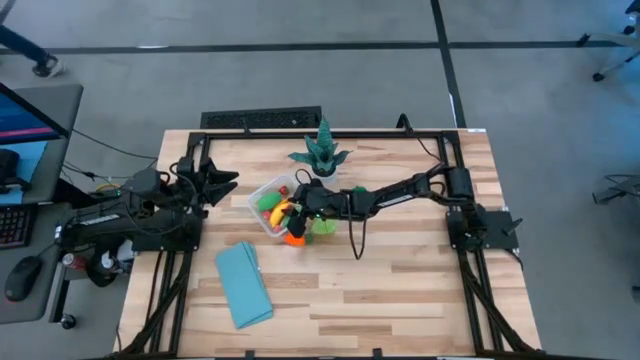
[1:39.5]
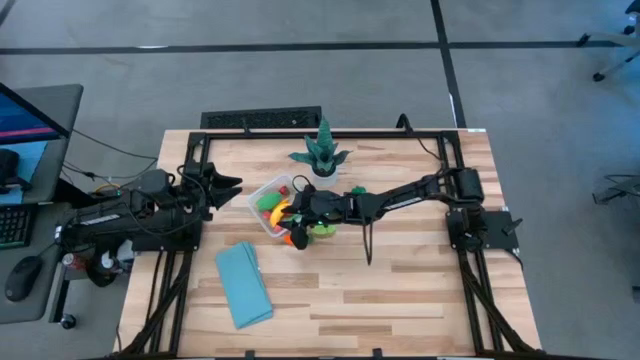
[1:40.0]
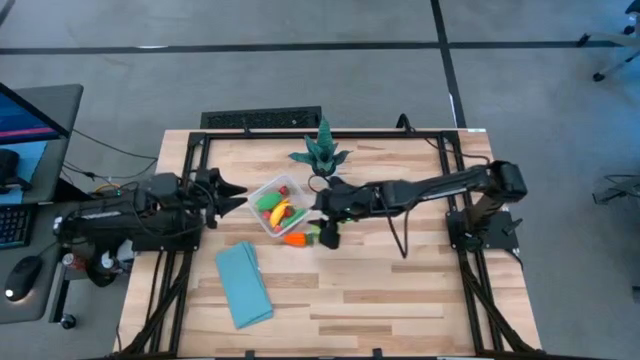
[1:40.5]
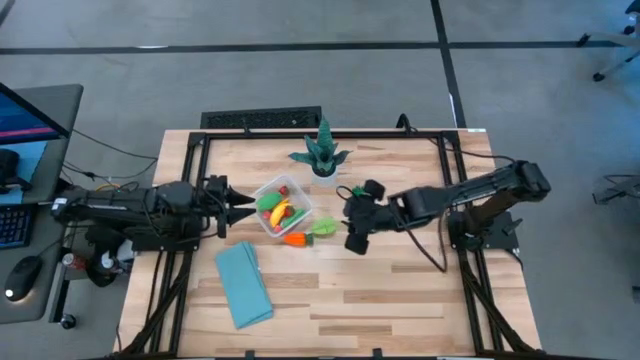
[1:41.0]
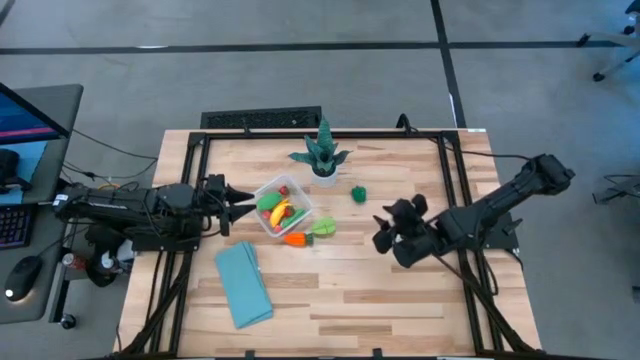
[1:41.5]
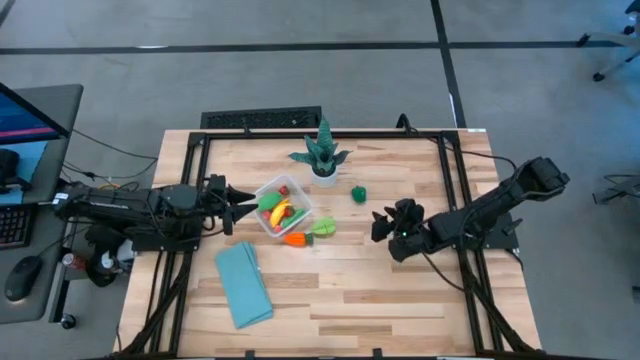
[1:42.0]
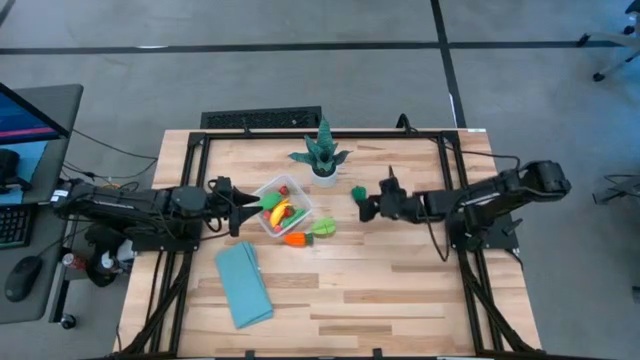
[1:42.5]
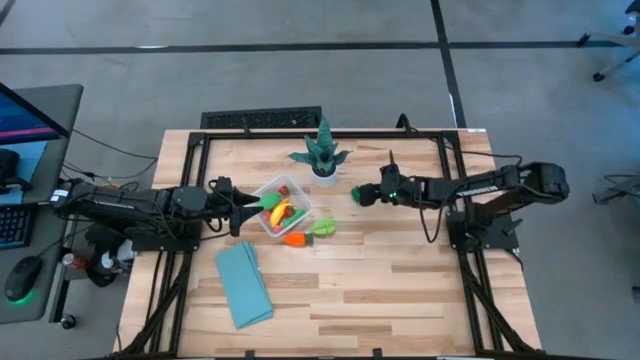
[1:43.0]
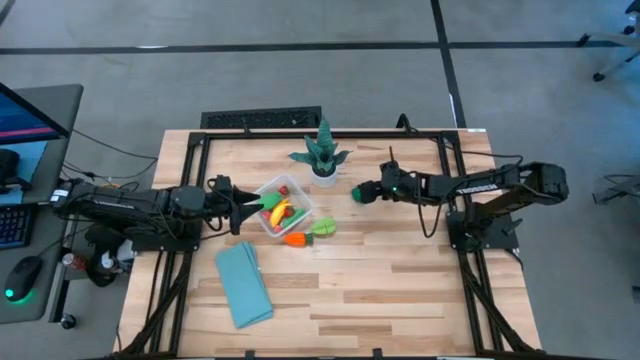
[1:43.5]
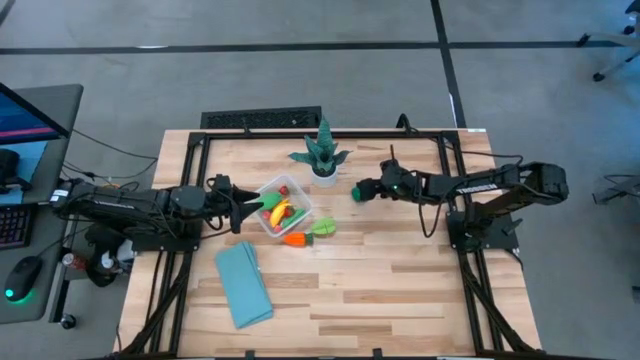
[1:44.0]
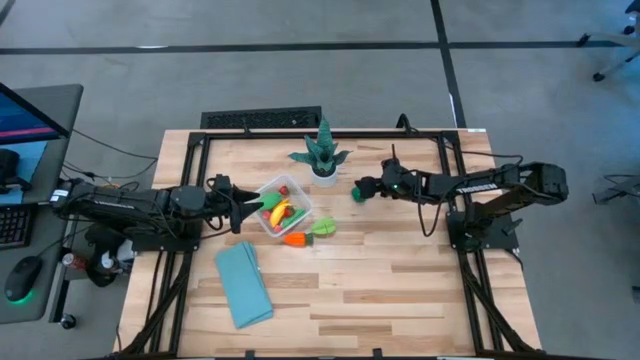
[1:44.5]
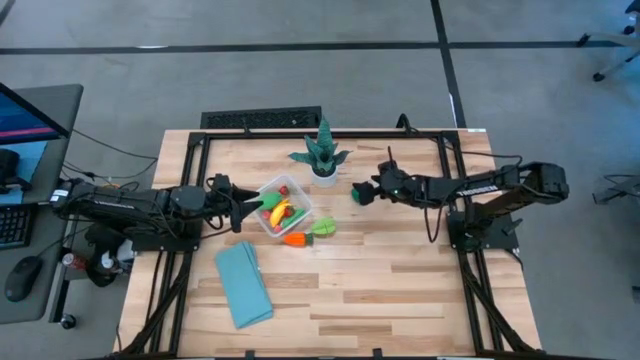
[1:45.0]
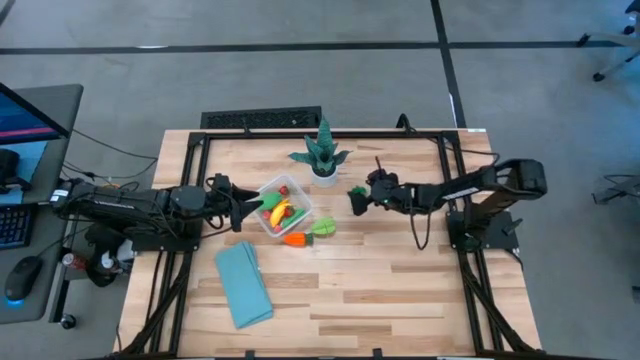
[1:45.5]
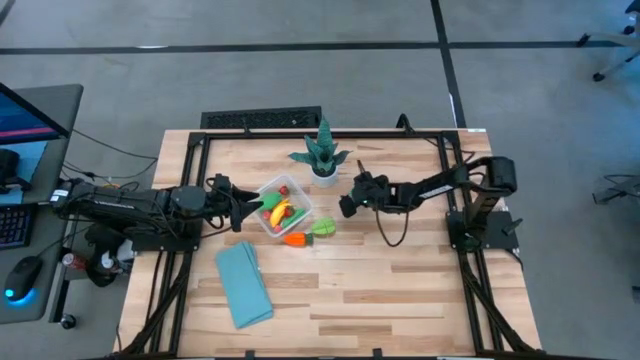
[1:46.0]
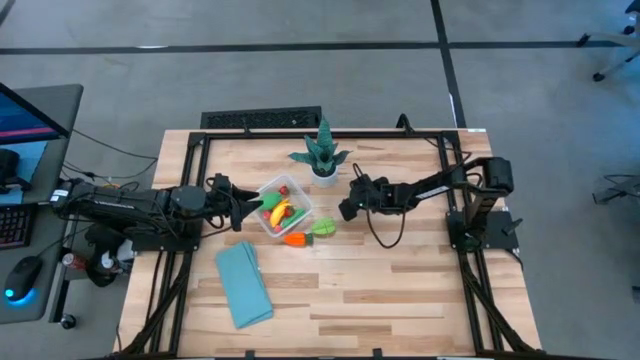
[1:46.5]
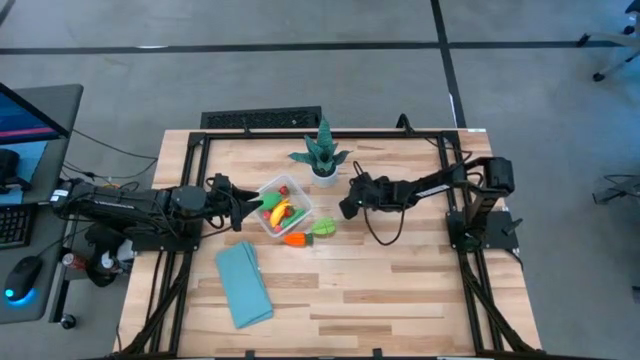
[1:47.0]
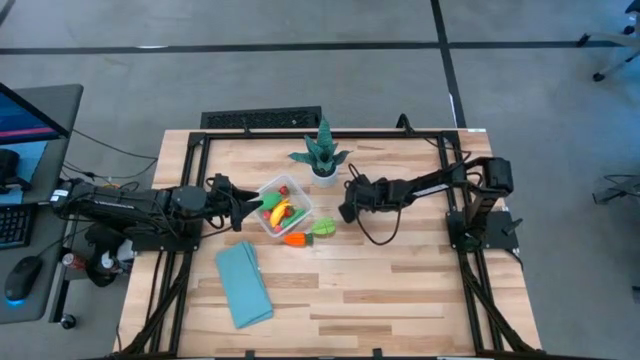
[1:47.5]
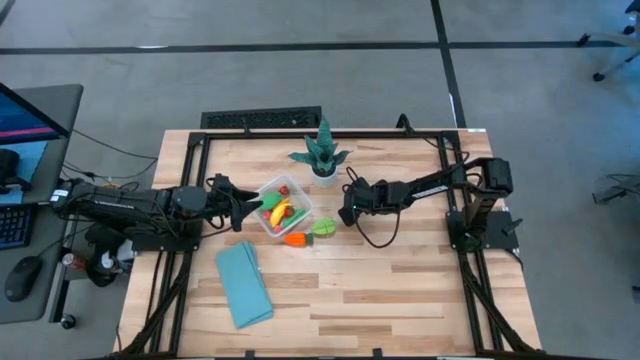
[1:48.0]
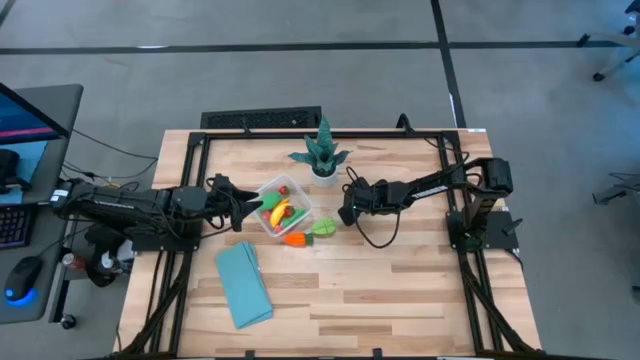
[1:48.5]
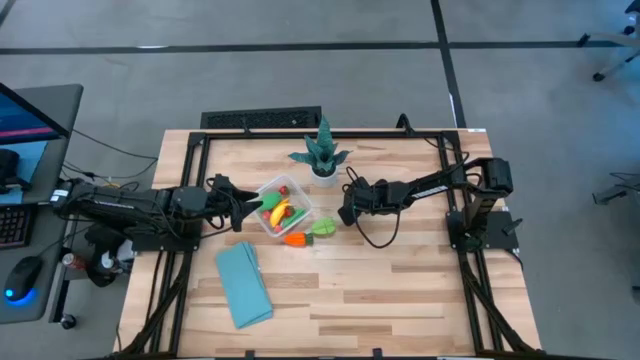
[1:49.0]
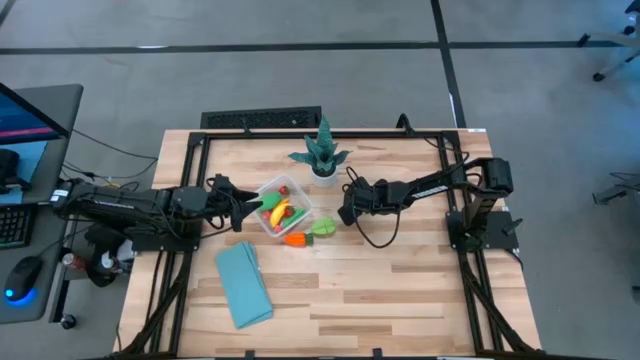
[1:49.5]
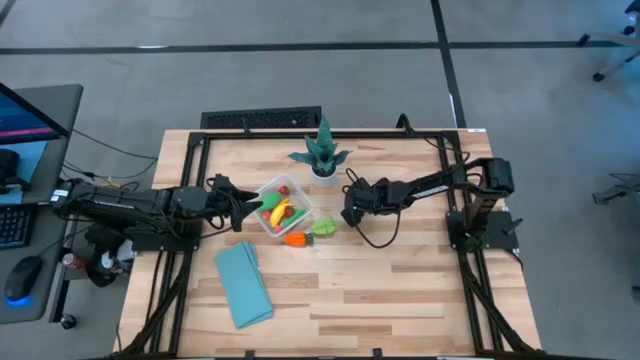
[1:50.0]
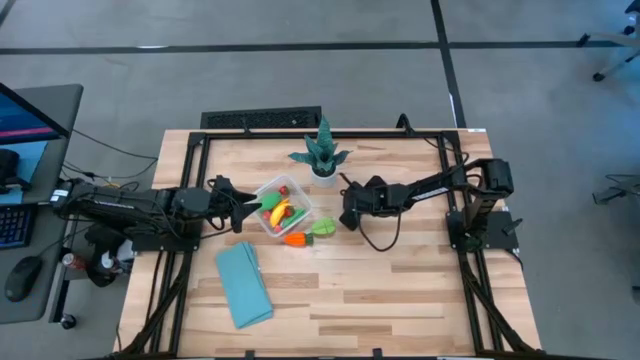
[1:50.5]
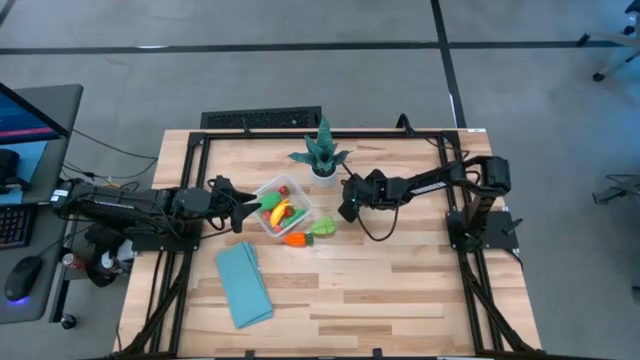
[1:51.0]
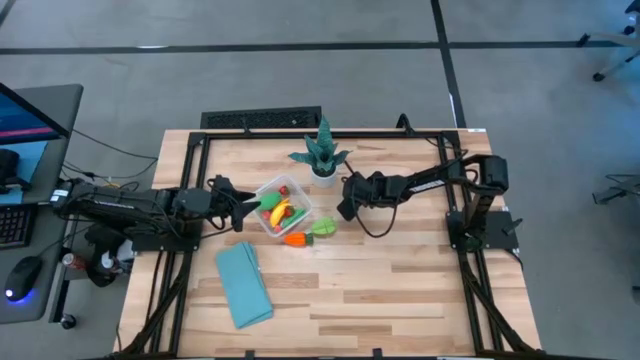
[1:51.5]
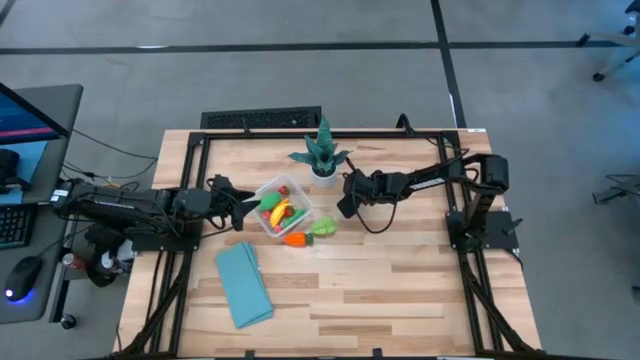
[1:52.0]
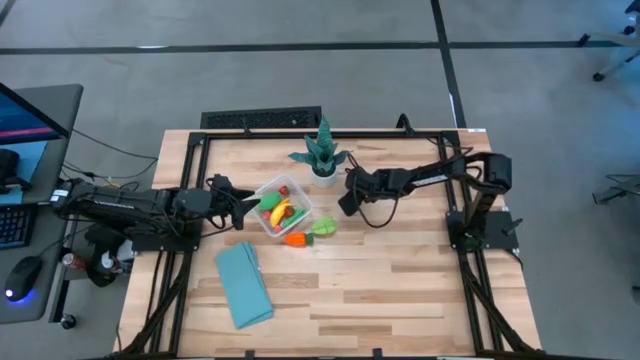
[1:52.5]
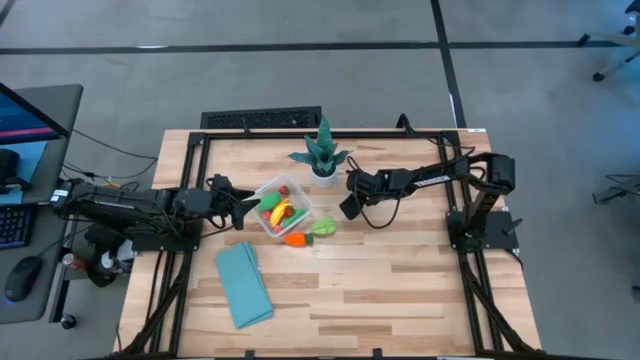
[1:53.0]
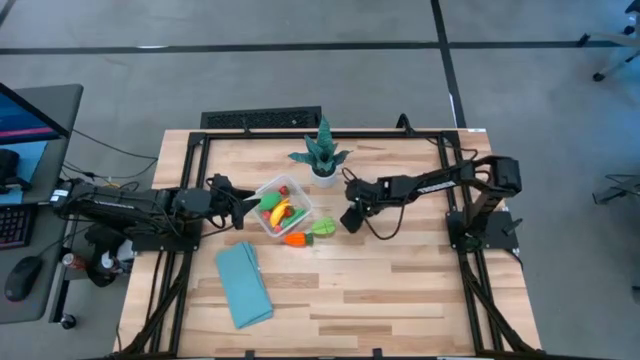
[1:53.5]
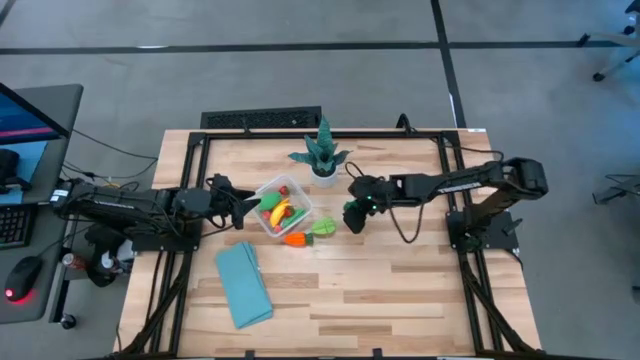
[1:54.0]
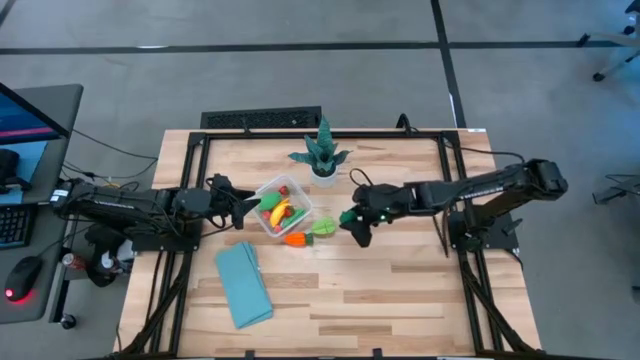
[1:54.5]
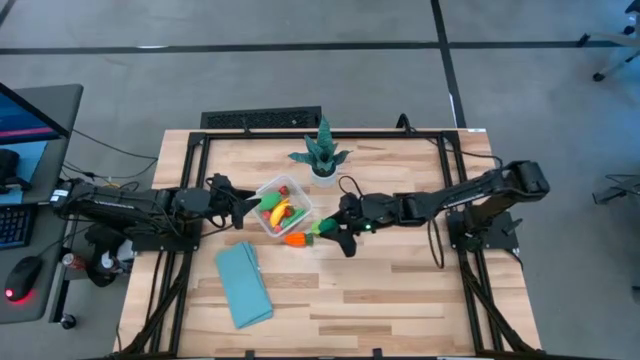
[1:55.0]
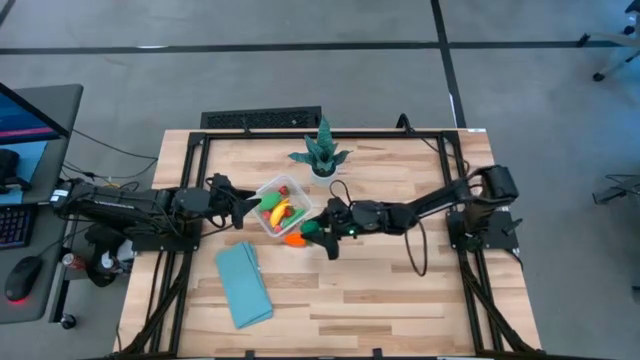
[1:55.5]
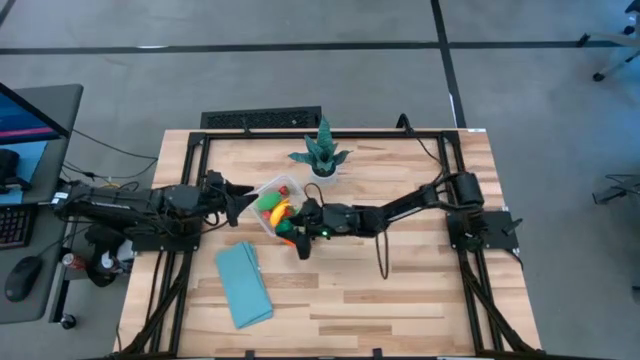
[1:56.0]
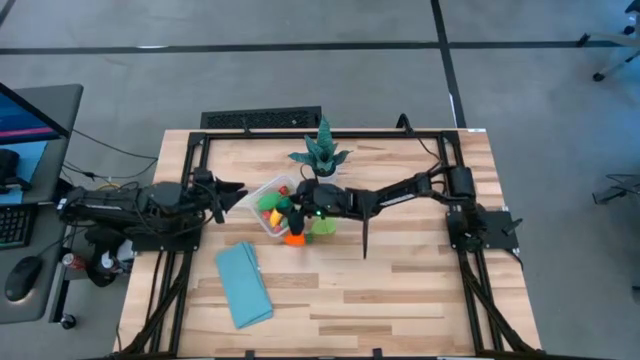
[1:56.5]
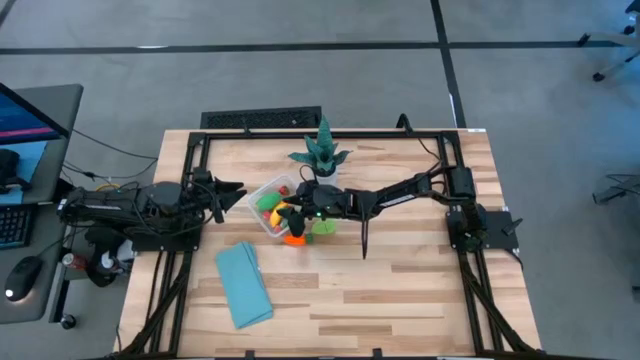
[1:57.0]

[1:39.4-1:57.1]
Task: Pick and placing Produce into tupperware
Put the green bell pepper into the transparent container

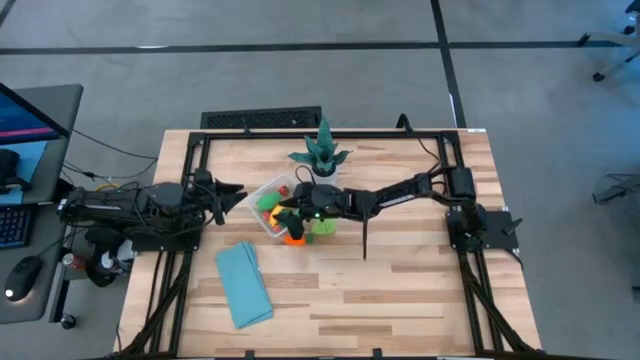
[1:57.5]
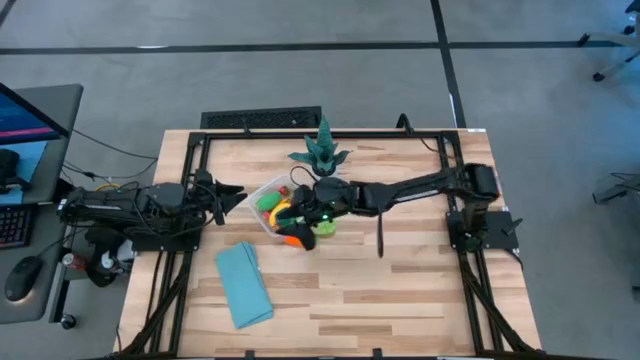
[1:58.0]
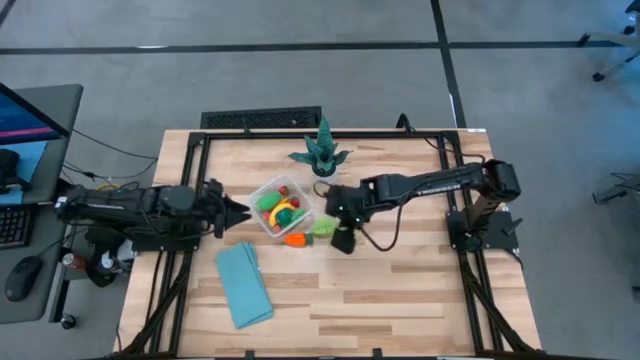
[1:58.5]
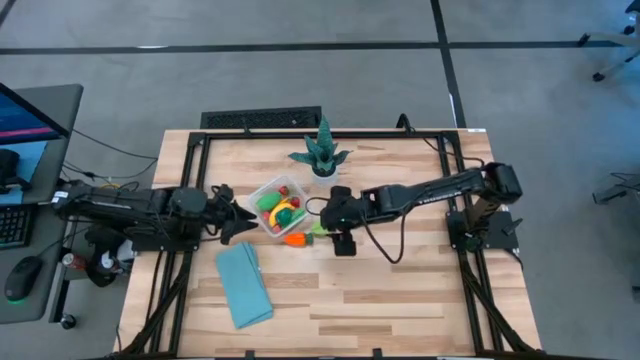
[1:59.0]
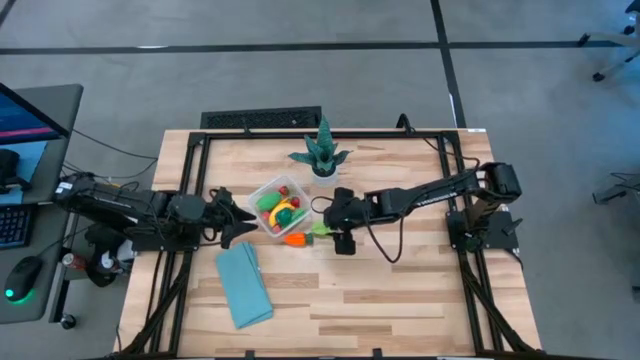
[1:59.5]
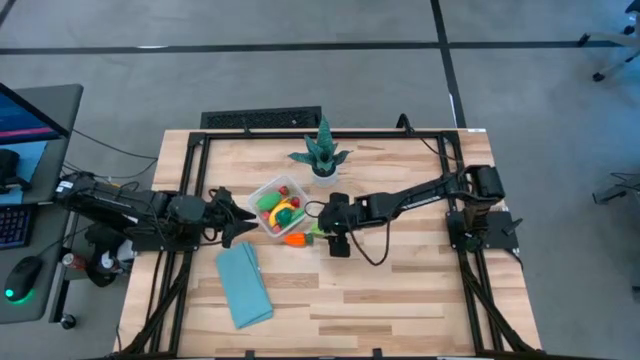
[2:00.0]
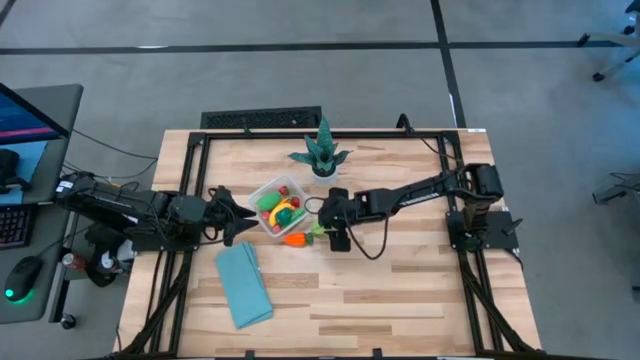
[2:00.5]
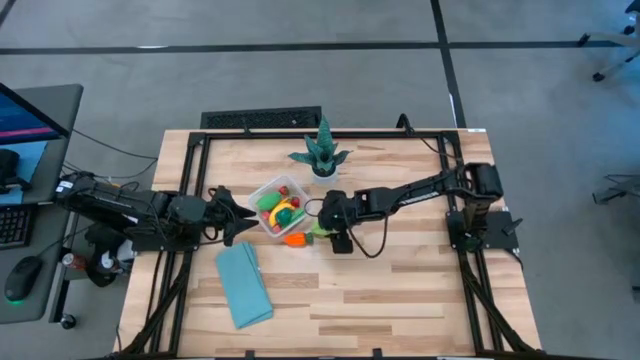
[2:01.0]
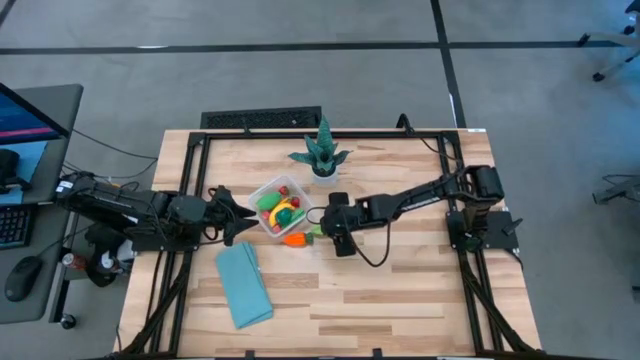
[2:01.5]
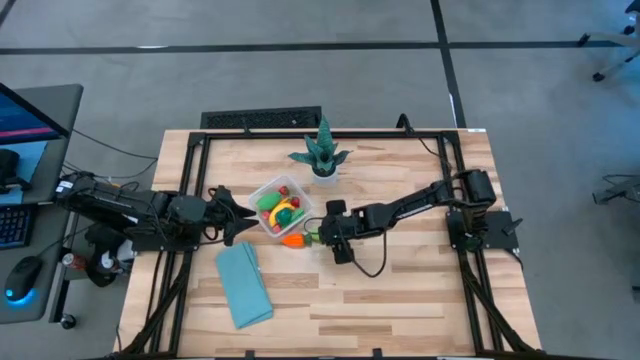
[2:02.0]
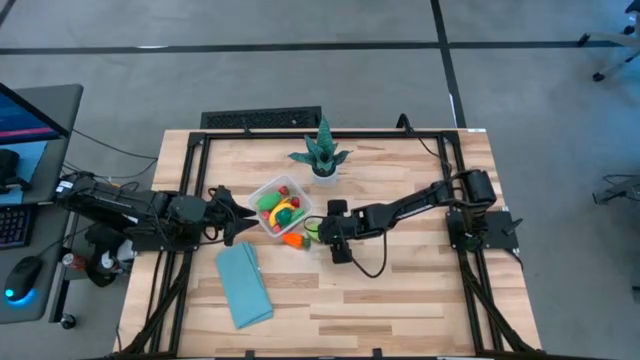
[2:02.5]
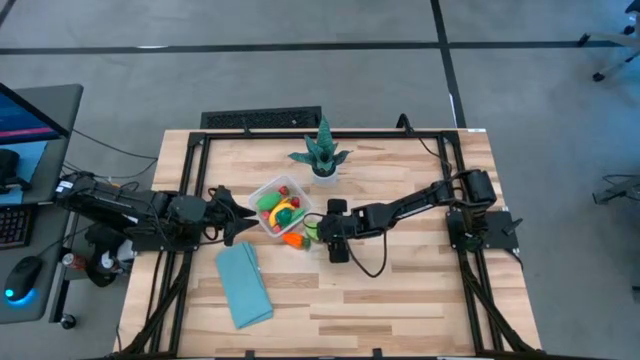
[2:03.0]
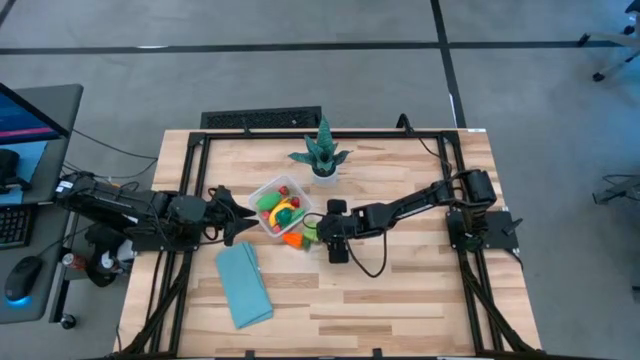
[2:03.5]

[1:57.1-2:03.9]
Put the green star fruit into the transparent container
